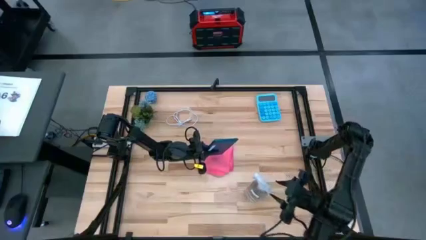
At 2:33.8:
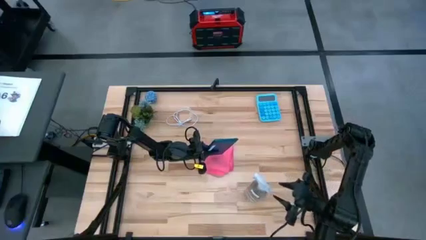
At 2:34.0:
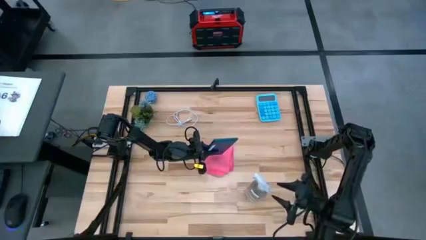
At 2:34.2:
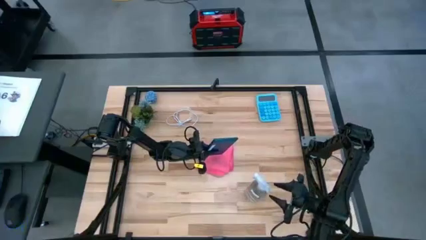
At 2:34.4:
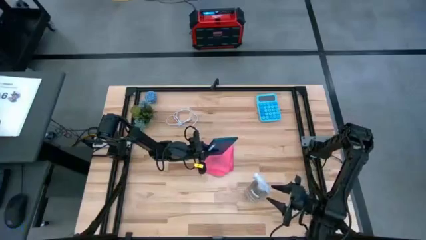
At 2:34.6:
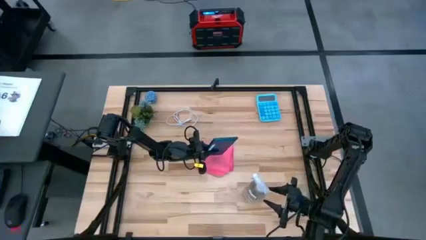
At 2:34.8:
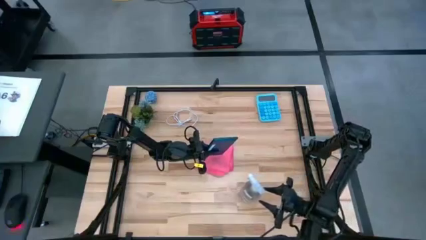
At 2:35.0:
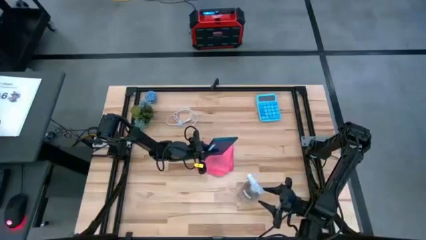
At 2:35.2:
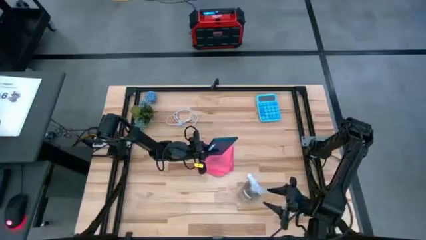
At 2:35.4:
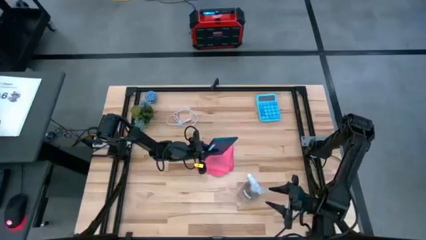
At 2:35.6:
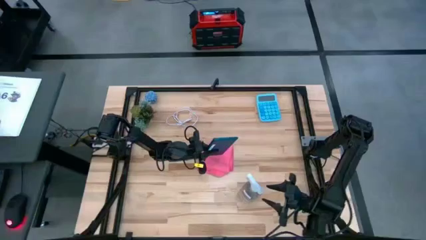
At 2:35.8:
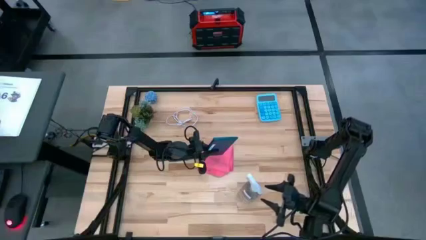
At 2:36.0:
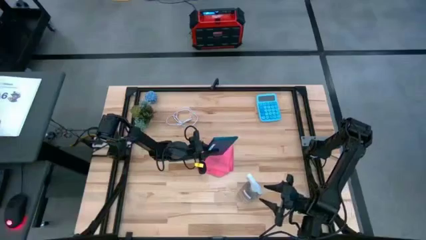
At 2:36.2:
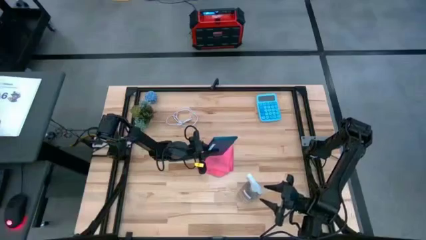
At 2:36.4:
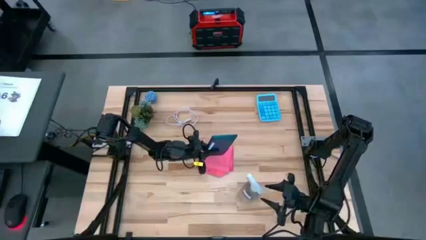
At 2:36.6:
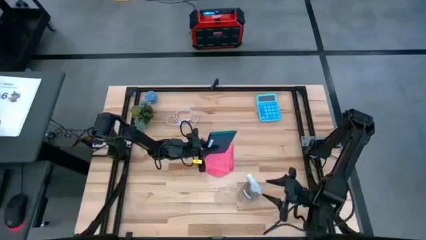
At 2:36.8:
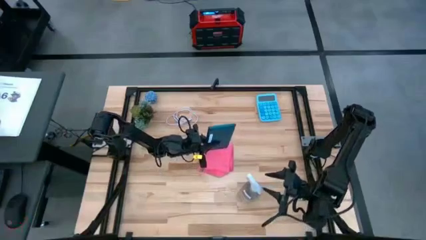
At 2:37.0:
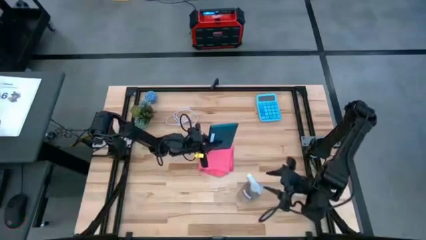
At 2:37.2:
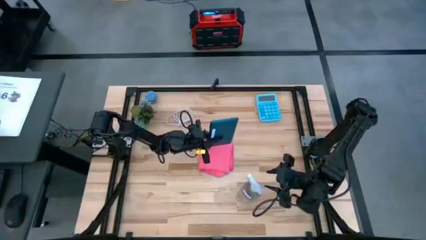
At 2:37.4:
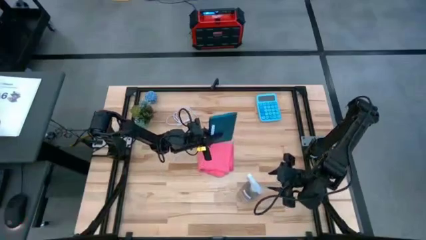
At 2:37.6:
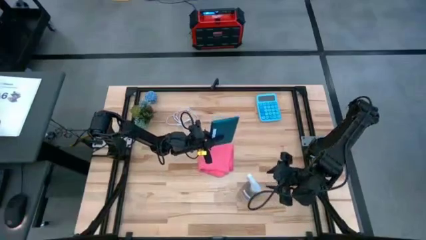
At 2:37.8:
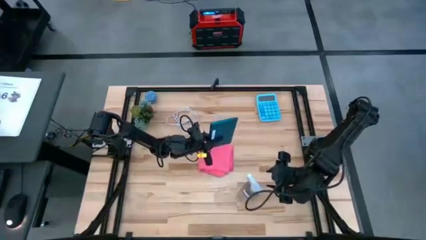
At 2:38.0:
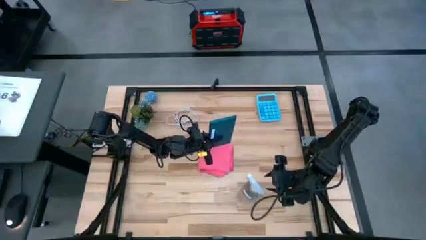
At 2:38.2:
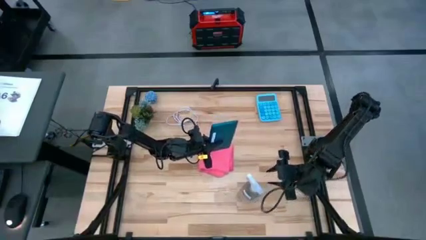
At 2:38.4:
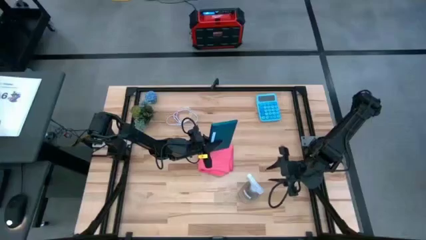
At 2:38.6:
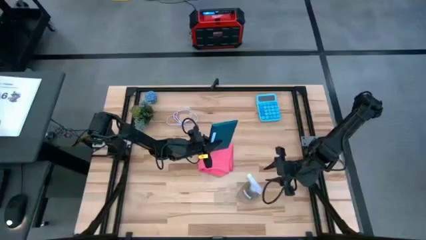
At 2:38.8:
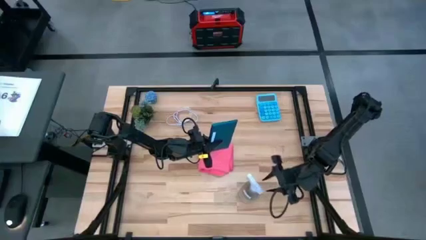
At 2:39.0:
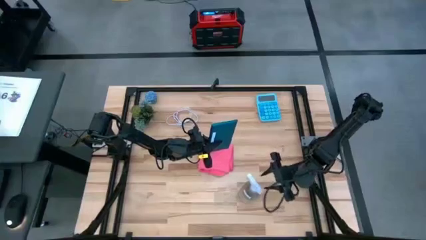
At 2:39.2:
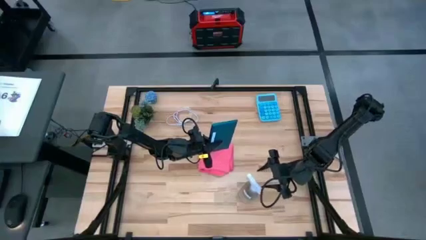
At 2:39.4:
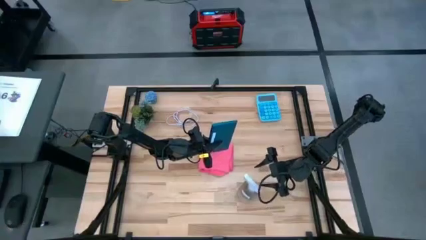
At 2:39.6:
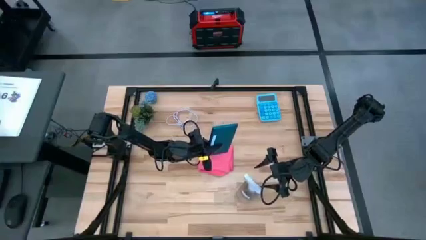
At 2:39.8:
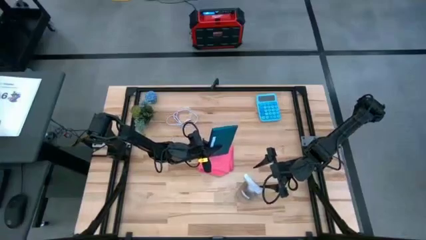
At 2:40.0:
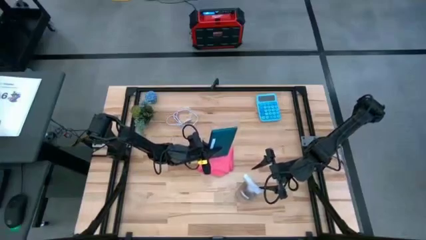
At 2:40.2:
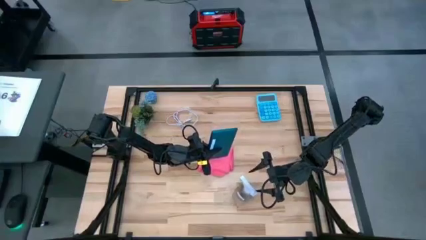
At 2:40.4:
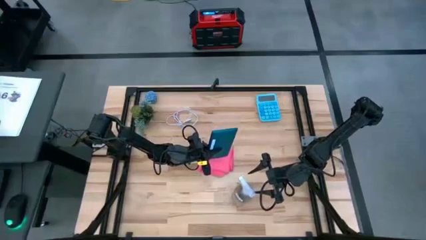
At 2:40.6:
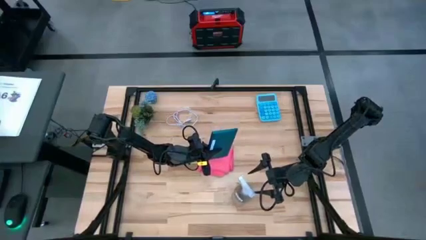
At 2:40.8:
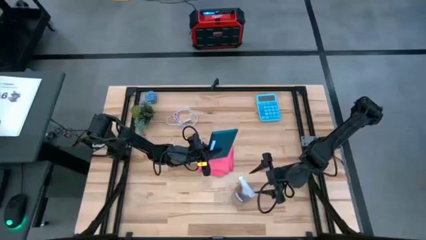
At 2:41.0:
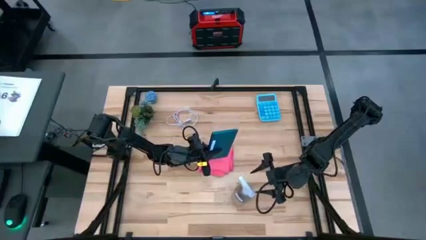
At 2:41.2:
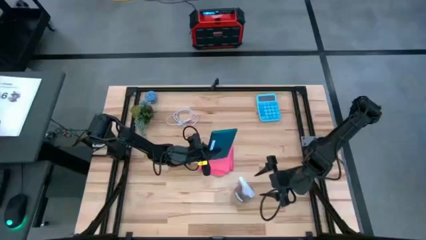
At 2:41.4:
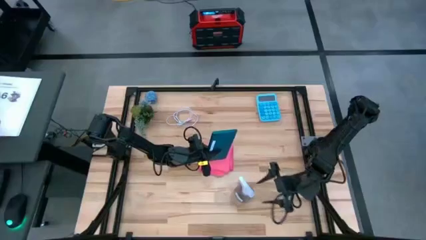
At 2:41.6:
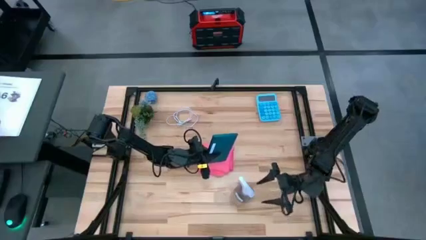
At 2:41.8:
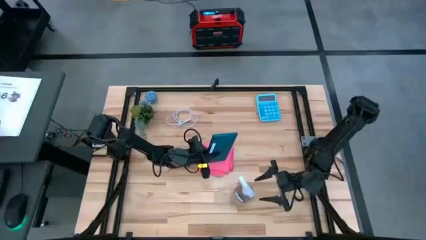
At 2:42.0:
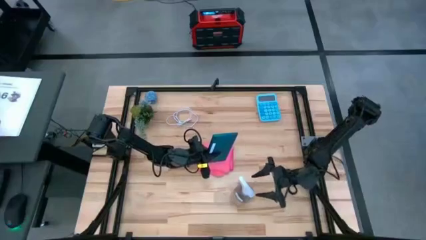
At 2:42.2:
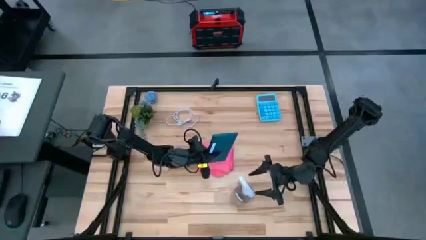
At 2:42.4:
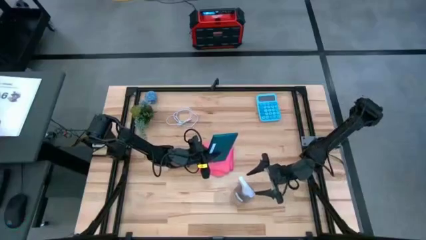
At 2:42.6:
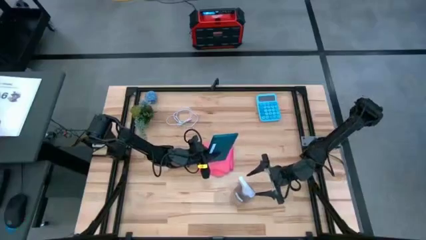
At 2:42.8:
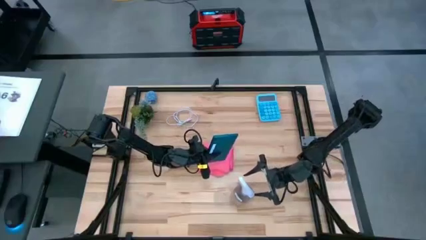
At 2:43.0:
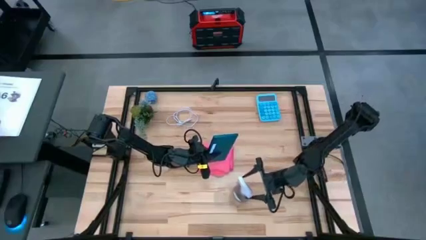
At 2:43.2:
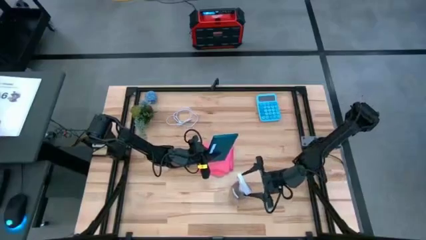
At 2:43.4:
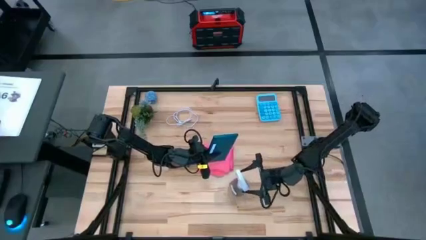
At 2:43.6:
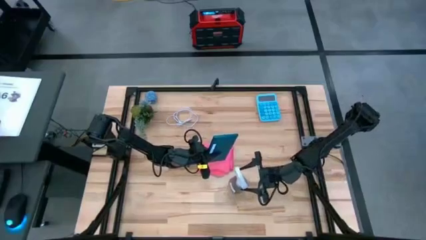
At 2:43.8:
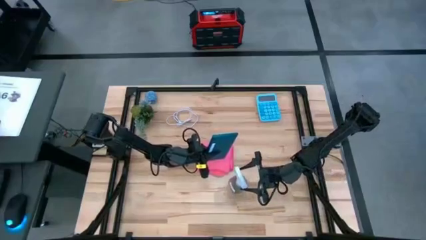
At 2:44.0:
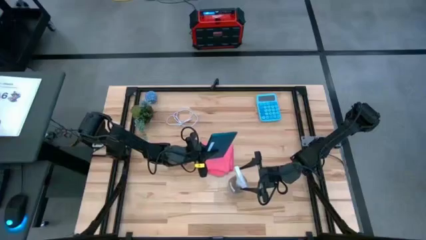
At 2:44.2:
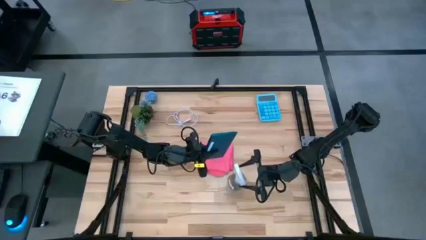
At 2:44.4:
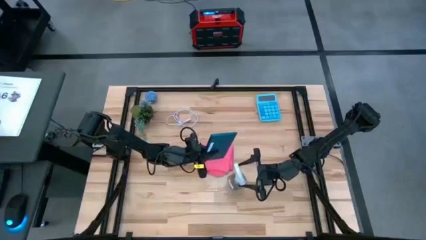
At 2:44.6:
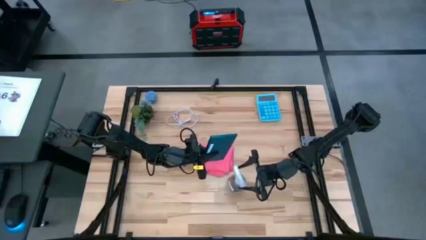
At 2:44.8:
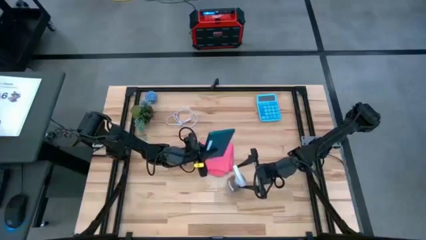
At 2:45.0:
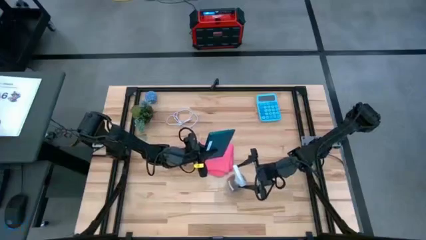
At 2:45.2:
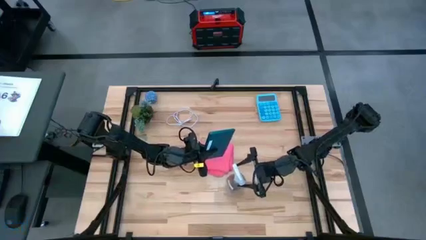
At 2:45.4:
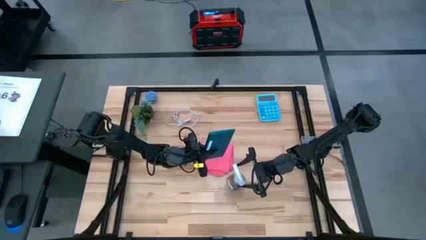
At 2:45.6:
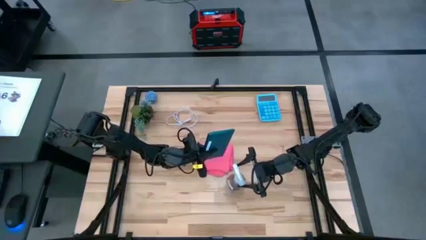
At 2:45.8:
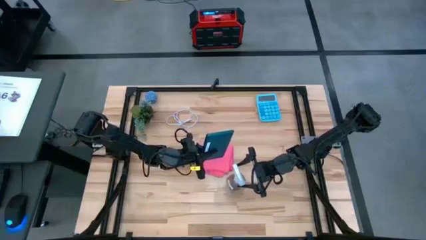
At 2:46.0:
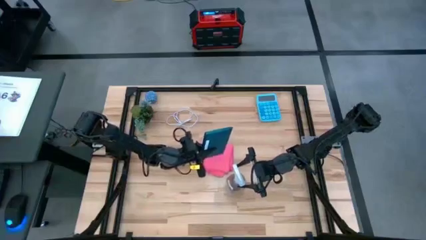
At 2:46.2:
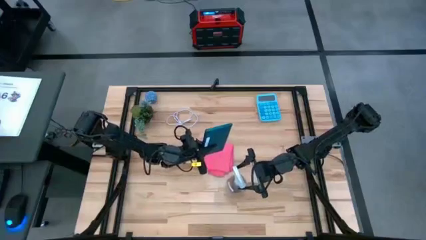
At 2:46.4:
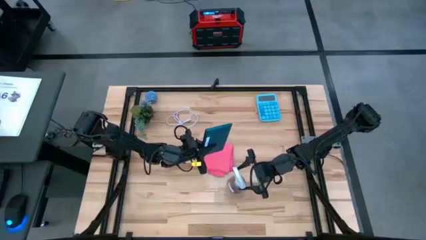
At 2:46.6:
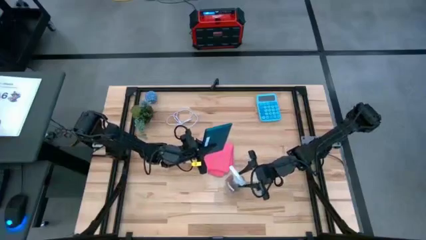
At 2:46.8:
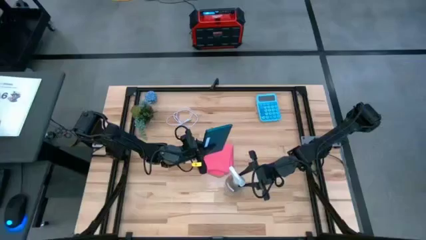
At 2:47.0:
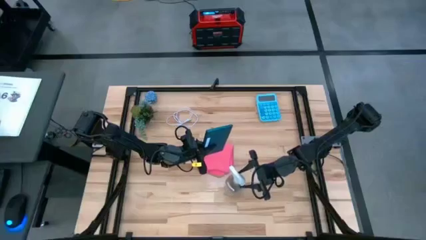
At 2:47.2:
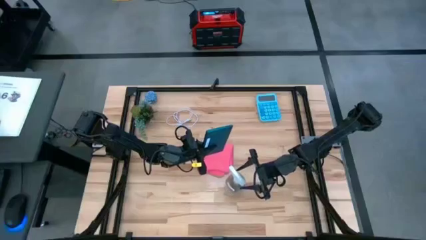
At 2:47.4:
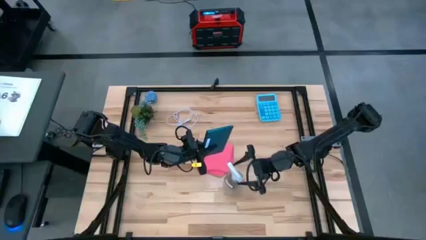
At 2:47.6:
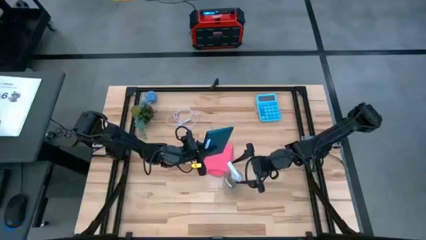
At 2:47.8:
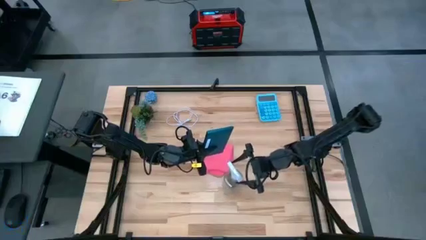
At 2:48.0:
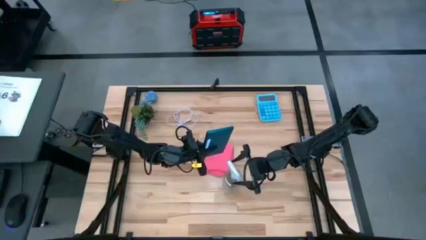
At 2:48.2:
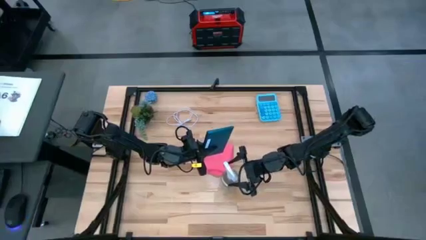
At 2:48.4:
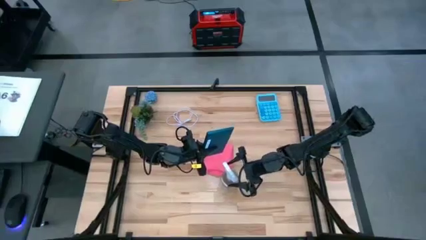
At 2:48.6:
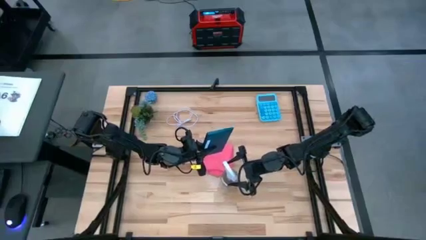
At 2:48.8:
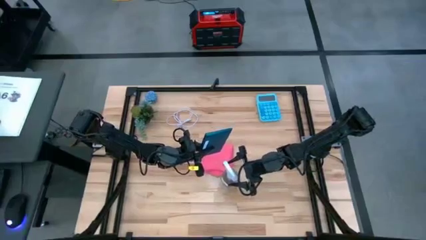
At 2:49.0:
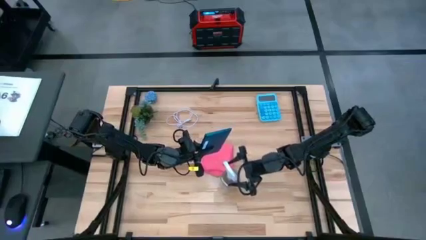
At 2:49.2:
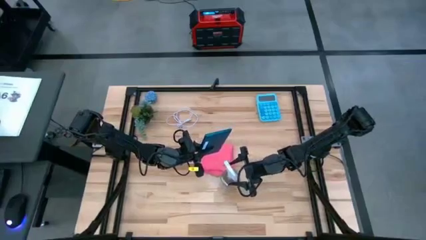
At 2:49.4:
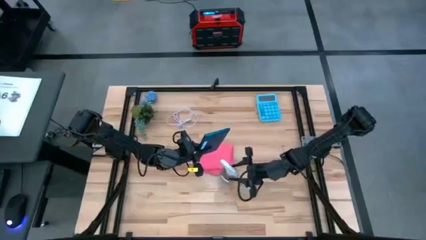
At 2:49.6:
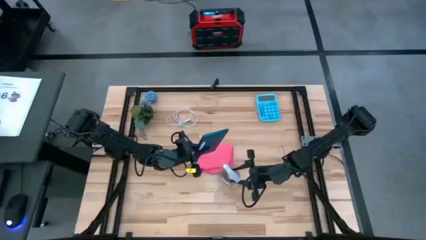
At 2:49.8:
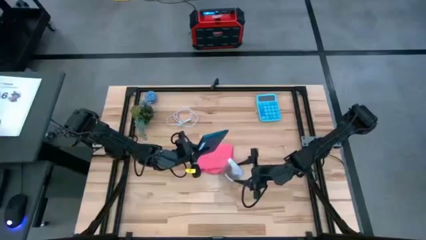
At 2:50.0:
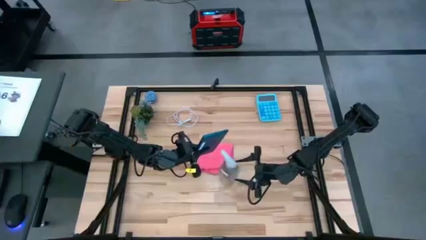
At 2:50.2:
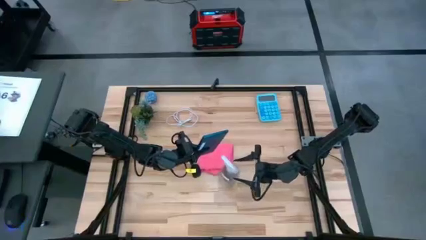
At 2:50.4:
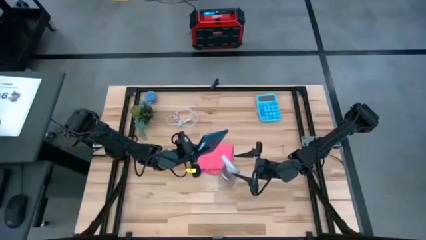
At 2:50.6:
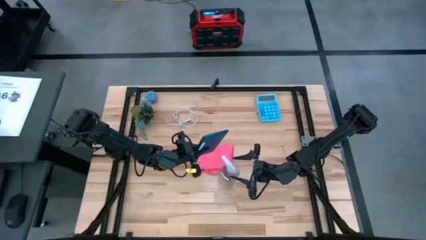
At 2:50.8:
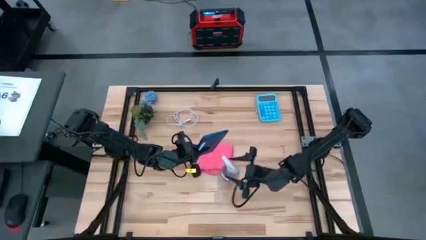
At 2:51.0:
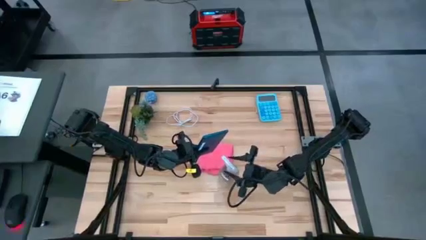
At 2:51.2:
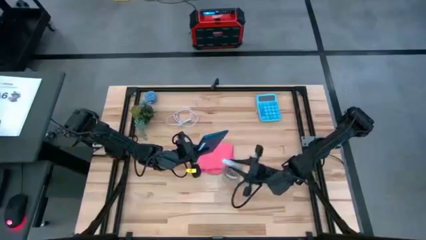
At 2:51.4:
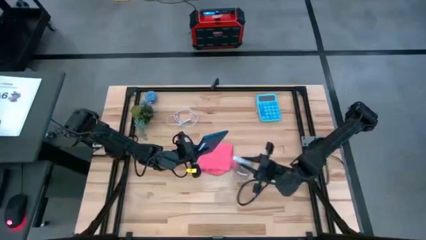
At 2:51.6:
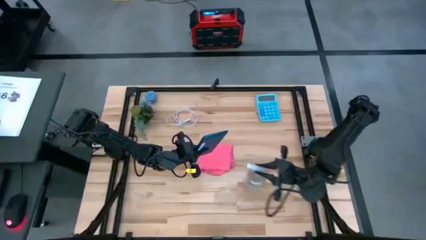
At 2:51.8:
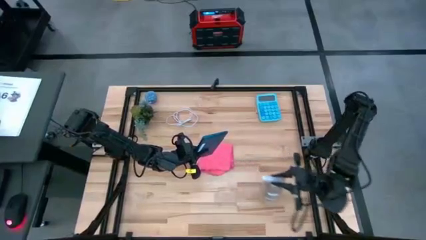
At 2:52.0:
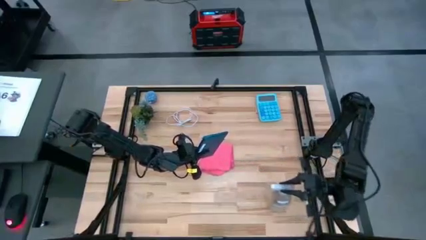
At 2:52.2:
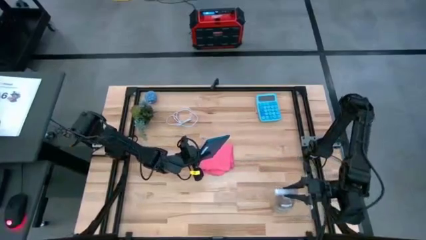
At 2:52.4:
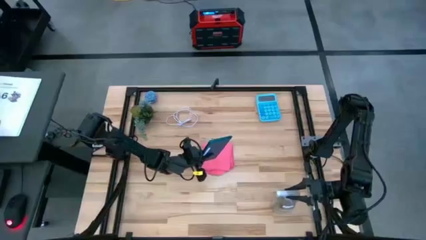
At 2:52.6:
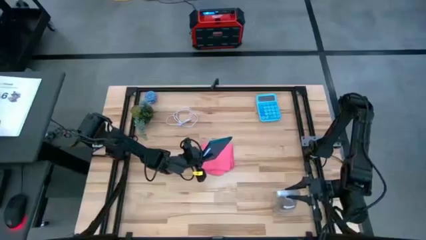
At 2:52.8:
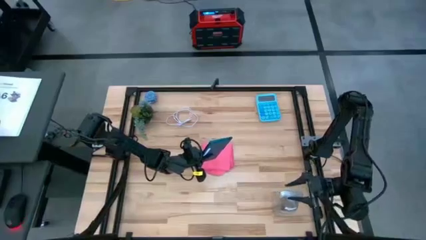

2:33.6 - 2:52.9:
Task: Apply microfiber cloth
Spray the back of the cellphone using the spray bottle
